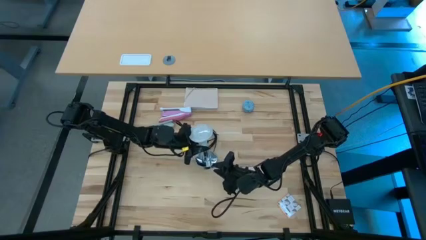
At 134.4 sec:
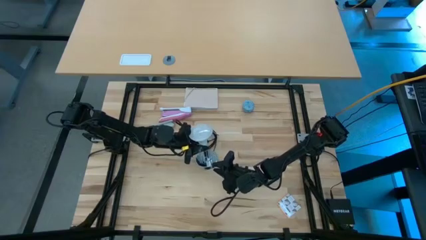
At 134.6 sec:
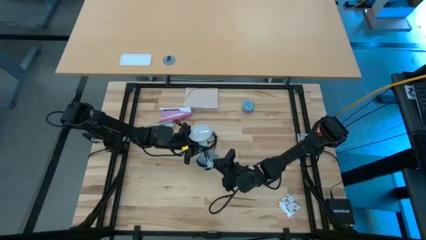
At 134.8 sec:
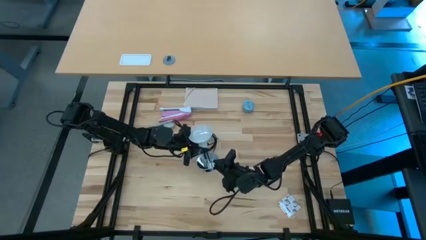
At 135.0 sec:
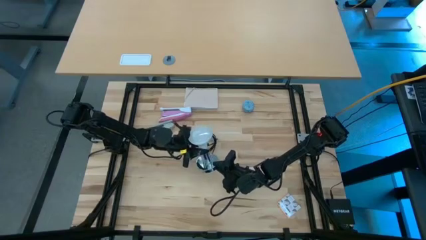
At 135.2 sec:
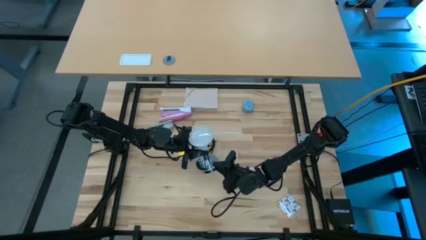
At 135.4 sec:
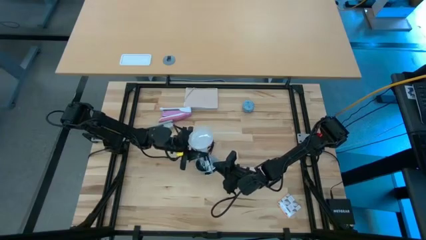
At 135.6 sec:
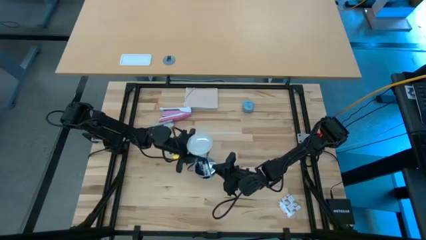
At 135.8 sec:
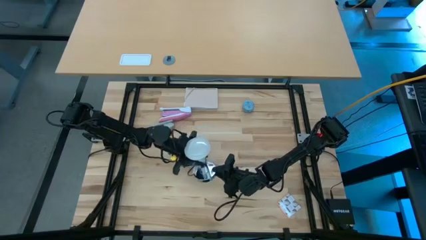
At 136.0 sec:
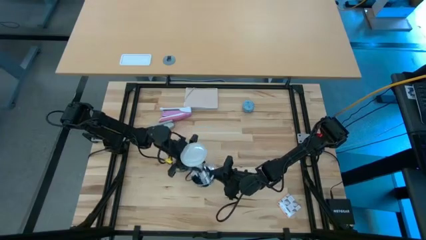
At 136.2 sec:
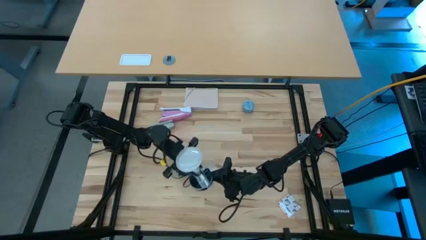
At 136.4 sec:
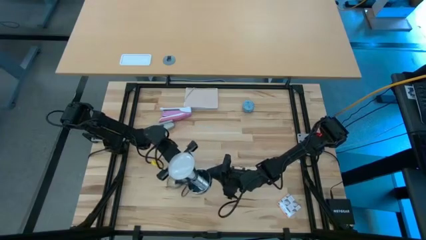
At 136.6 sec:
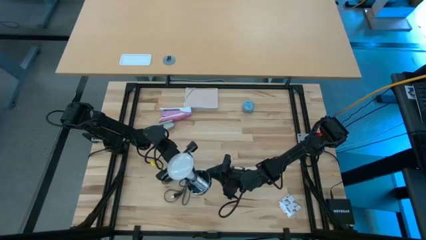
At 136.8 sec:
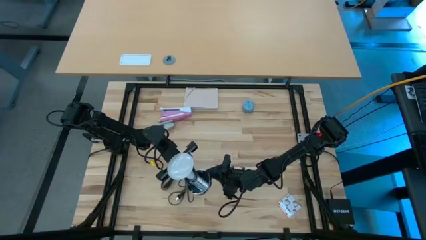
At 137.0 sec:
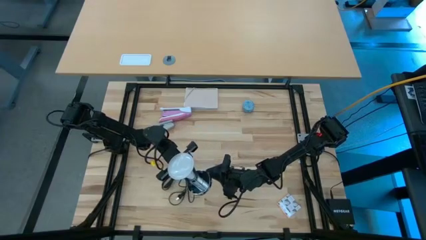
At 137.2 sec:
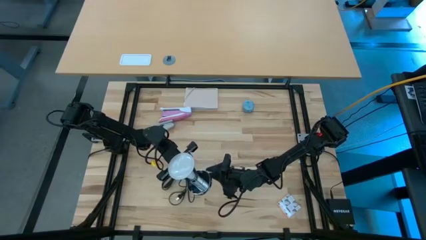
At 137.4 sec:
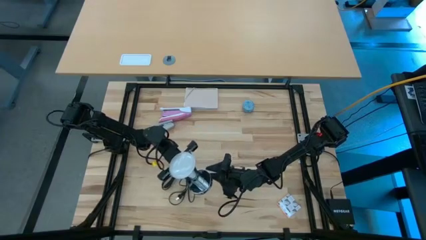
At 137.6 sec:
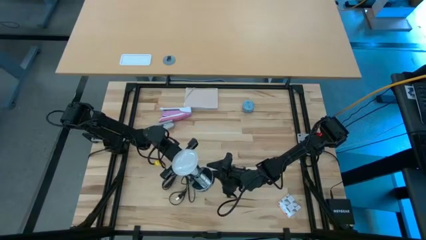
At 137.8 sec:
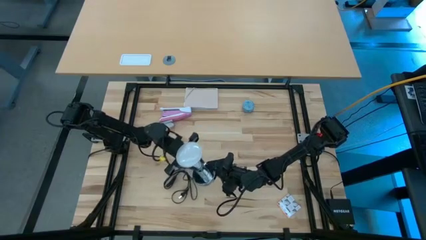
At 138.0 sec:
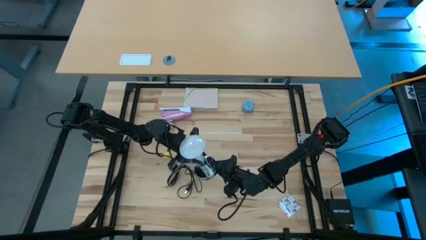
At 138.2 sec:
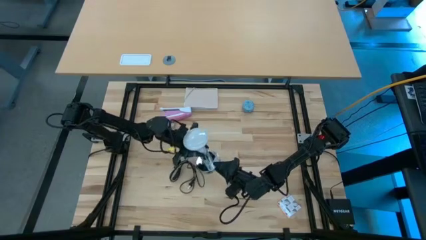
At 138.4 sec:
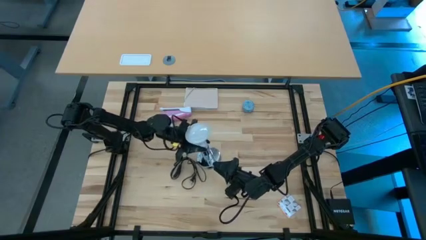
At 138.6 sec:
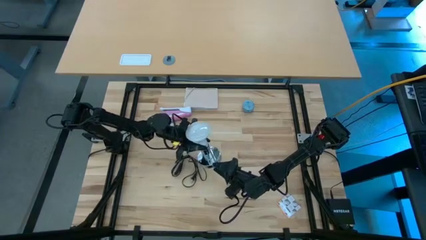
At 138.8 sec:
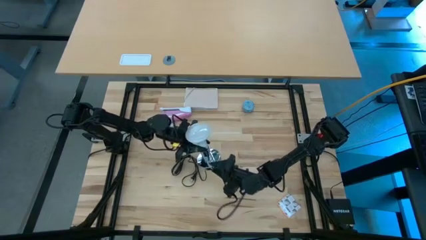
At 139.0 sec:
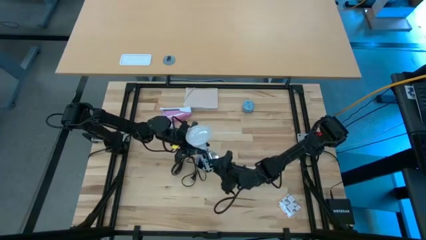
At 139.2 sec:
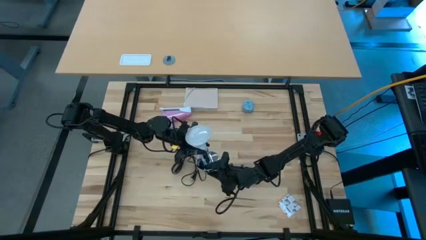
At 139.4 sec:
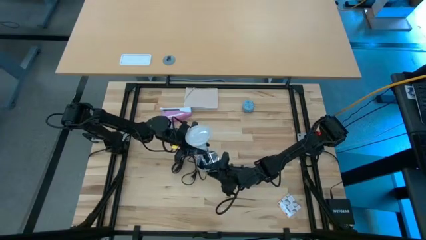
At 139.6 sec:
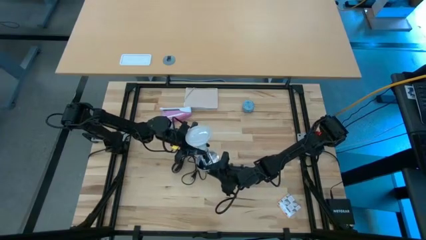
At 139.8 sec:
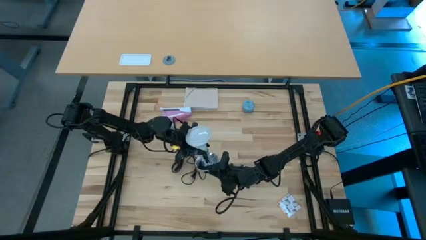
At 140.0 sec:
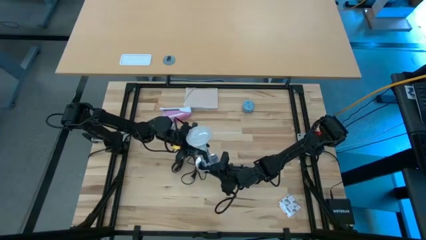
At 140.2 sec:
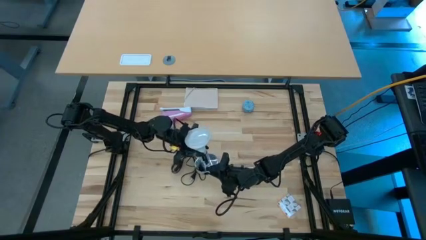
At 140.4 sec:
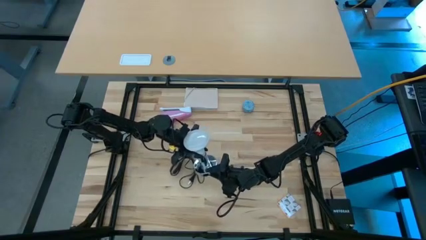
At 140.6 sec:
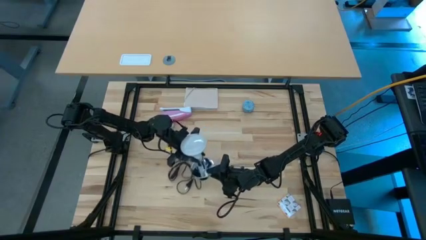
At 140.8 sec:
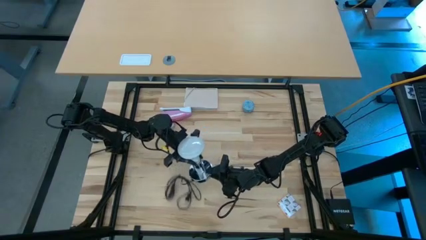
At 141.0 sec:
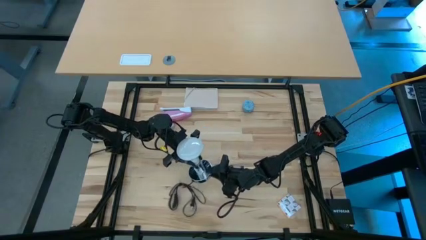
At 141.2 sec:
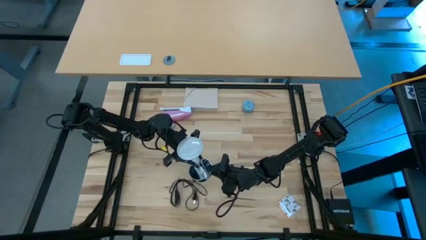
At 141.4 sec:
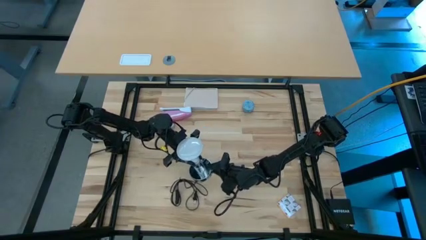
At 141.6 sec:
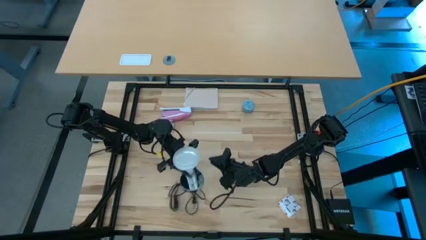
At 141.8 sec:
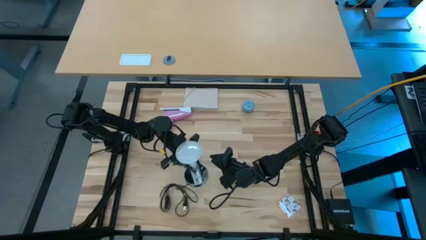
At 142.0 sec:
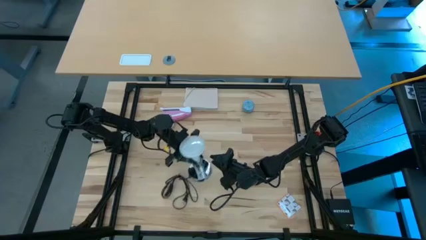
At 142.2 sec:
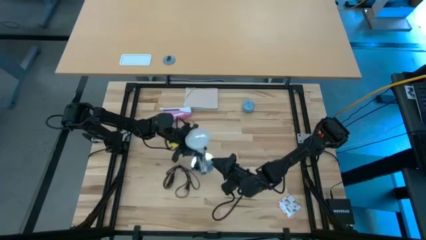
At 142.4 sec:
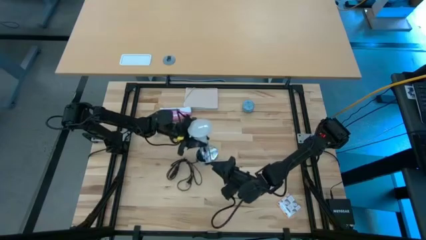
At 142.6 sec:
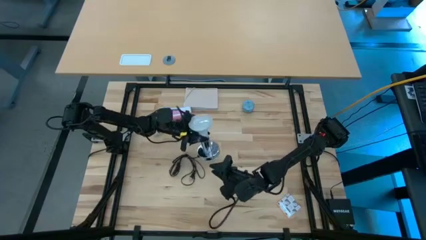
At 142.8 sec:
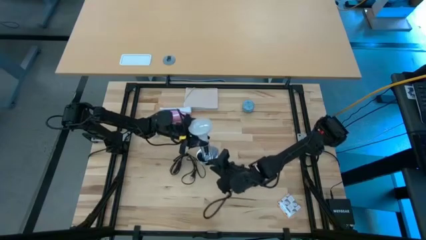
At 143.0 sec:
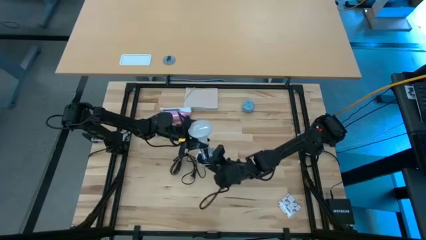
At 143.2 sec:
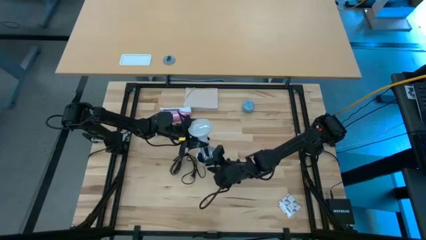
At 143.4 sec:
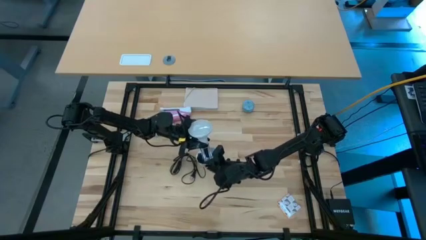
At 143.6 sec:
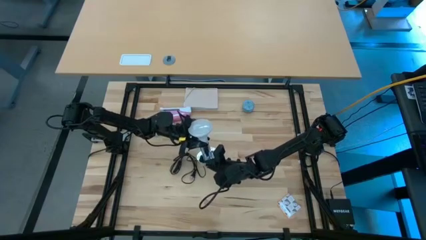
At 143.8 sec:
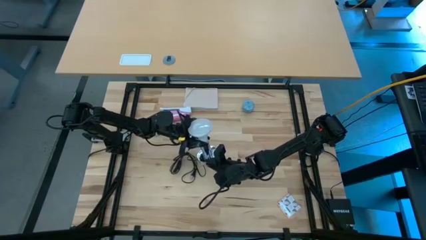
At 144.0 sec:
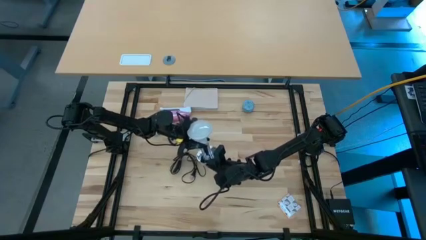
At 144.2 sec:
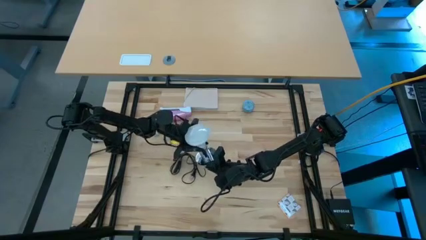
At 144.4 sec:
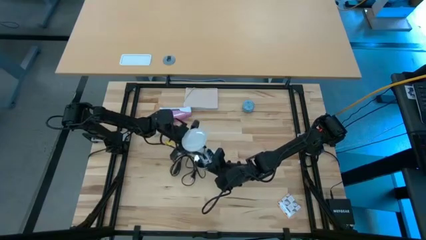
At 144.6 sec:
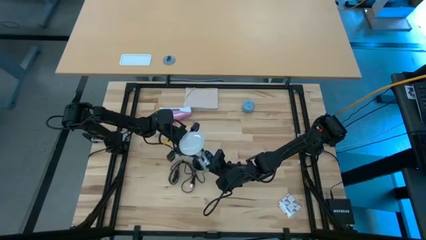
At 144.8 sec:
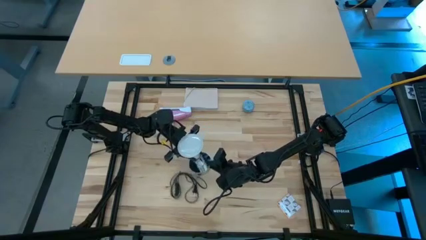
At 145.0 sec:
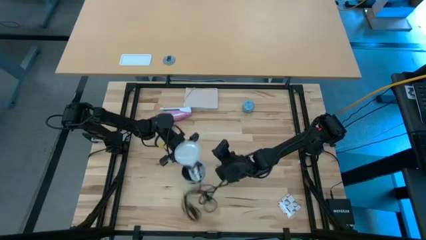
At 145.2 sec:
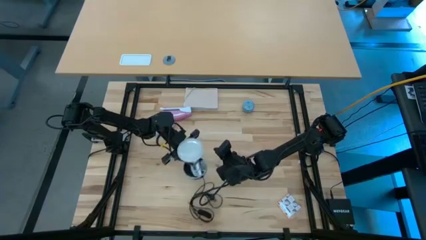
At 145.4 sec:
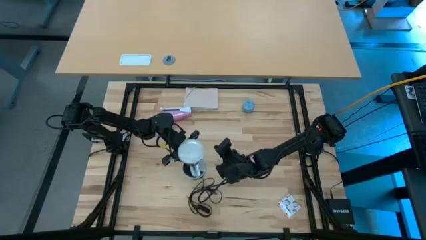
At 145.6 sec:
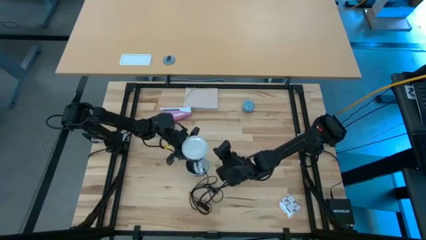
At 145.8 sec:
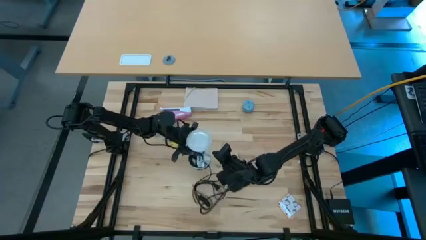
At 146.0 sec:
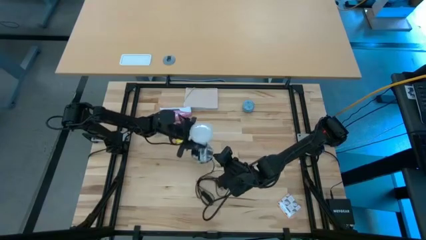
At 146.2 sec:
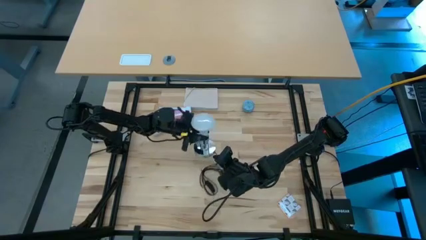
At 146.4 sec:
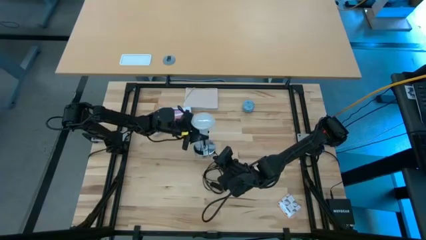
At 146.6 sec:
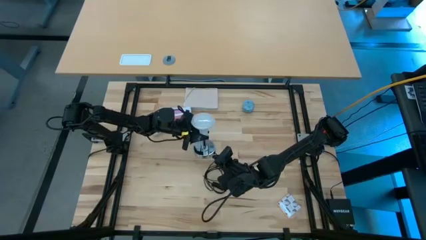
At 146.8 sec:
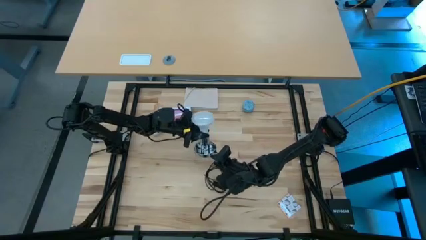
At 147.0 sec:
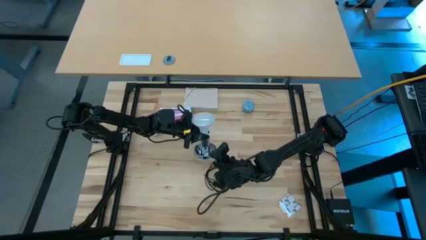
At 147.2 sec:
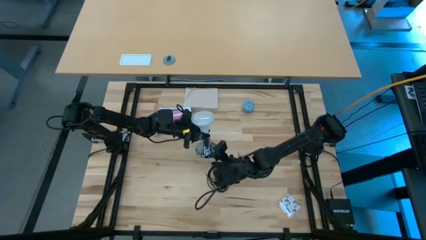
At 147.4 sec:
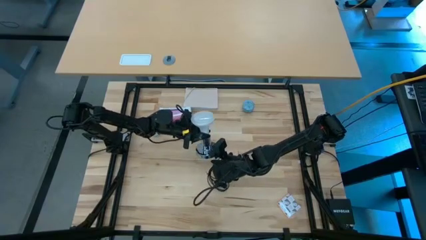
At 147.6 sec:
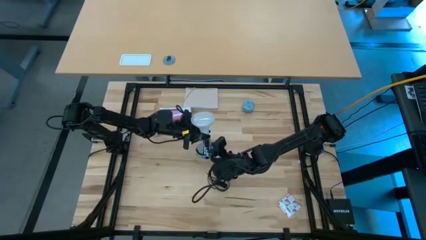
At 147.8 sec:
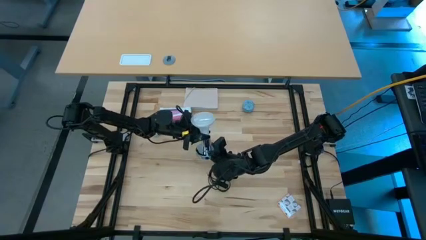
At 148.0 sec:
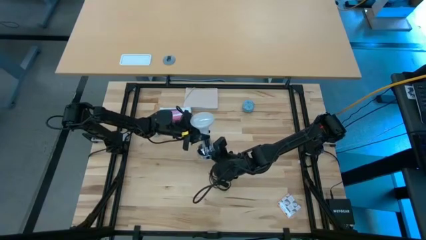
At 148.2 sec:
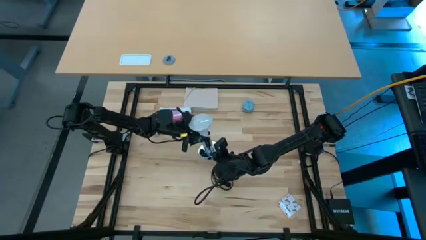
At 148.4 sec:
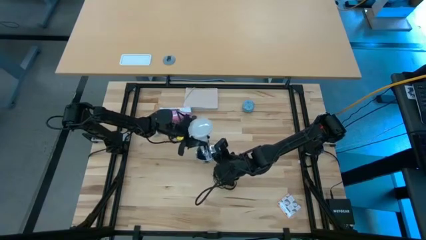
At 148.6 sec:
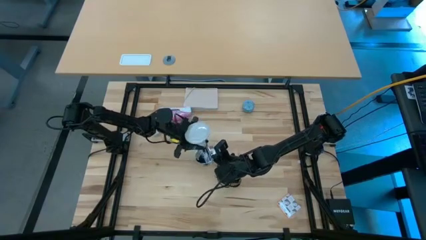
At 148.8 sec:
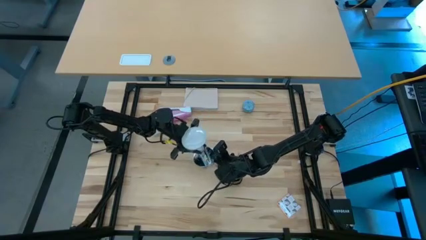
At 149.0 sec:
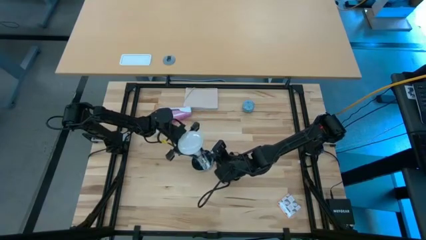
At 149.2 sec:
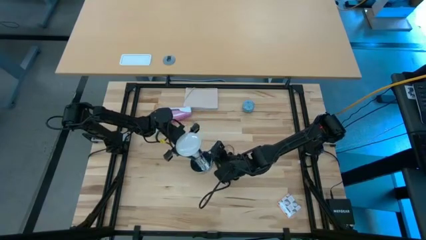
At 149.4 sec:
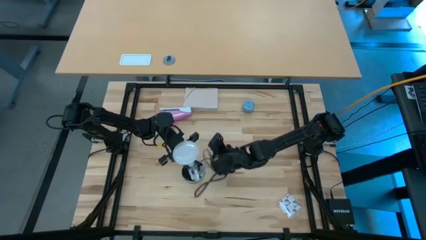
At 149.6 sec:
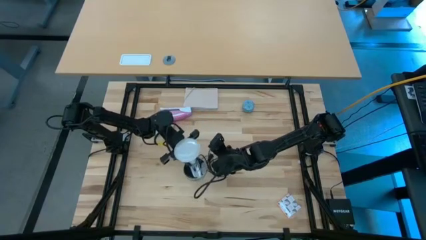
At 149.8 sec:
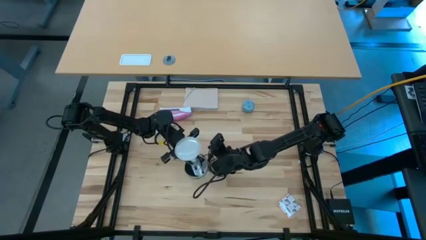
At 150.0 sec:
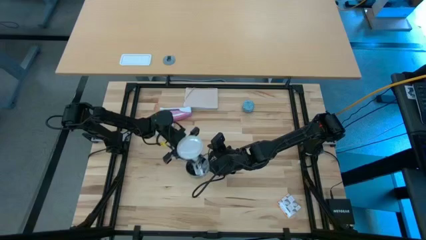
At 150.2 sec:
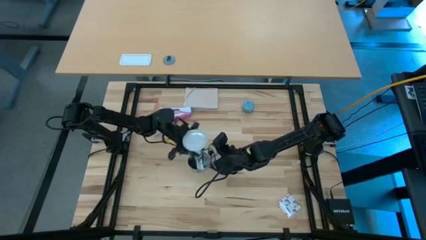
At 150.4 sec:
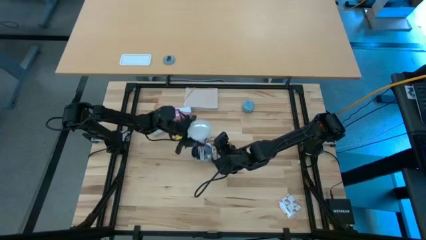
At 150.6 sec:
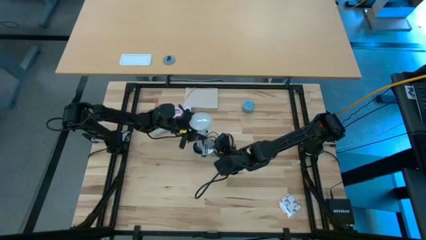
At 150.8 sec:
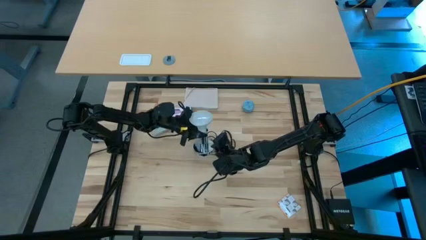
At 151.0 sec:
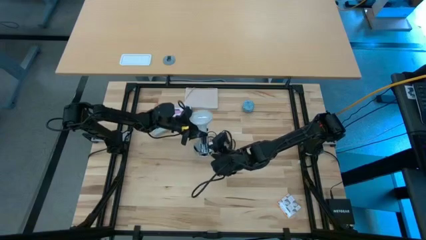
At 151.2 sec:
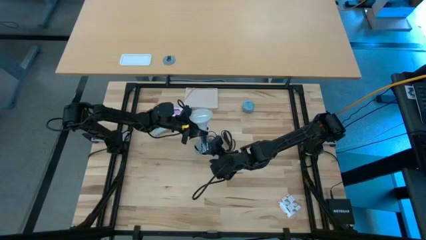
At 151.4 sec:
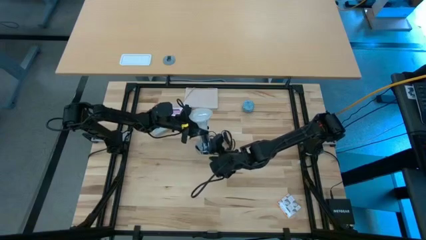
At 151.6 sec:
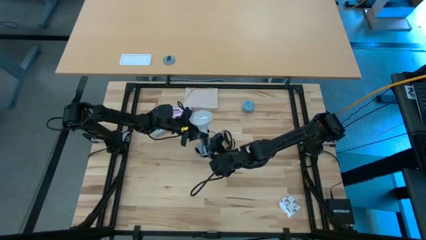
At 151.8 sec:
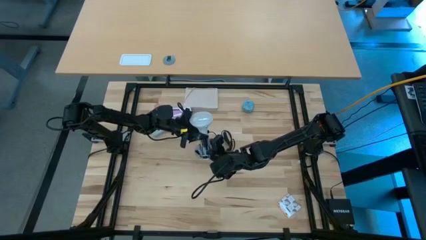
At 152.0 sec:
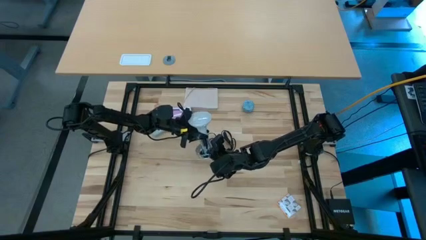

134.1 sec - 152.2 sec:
Task: Screw lightbulb
Insert the white lightbulb into the desk lamp
